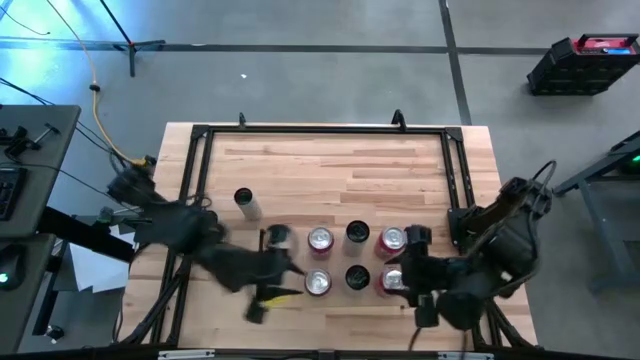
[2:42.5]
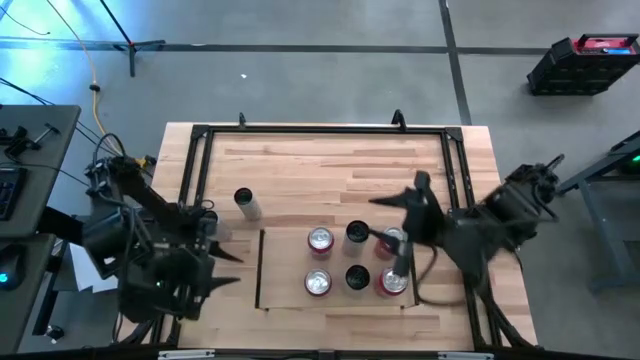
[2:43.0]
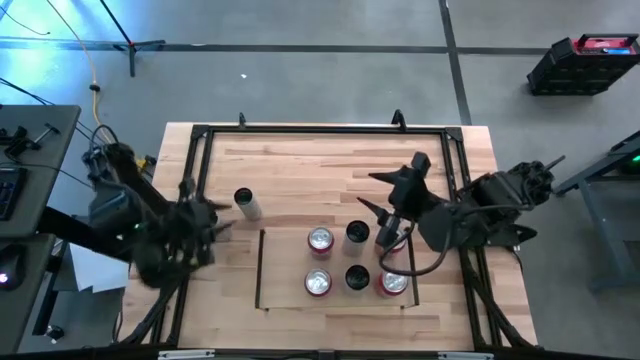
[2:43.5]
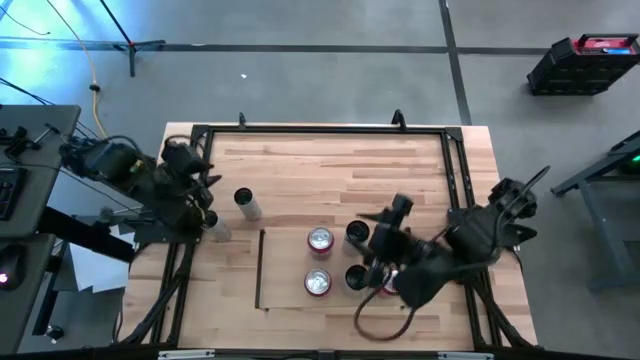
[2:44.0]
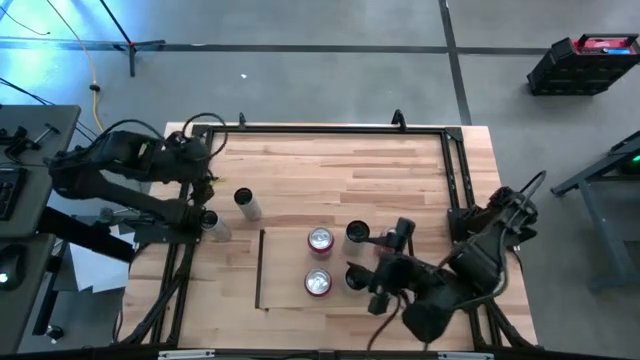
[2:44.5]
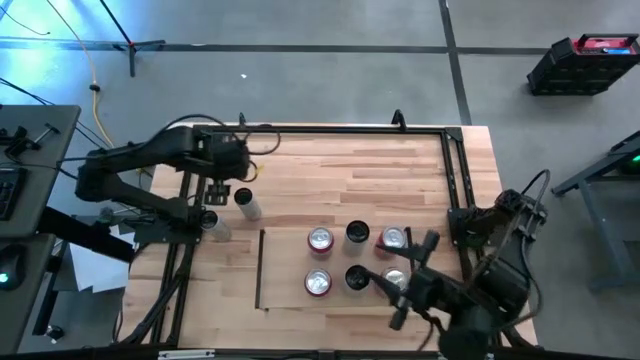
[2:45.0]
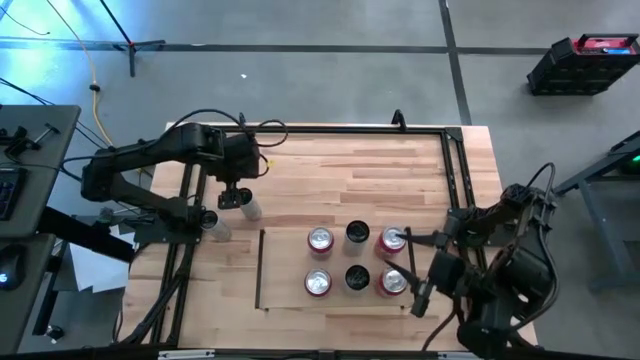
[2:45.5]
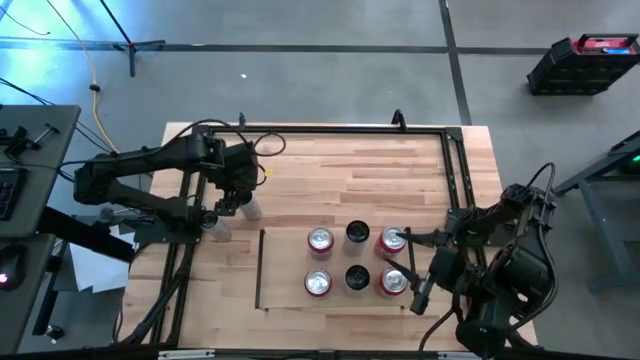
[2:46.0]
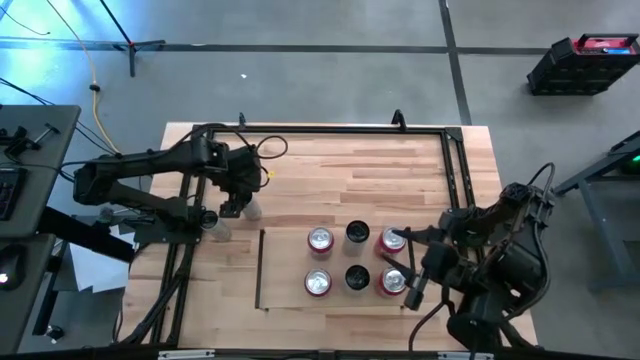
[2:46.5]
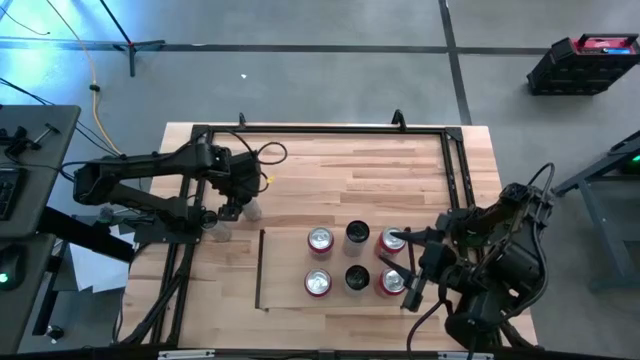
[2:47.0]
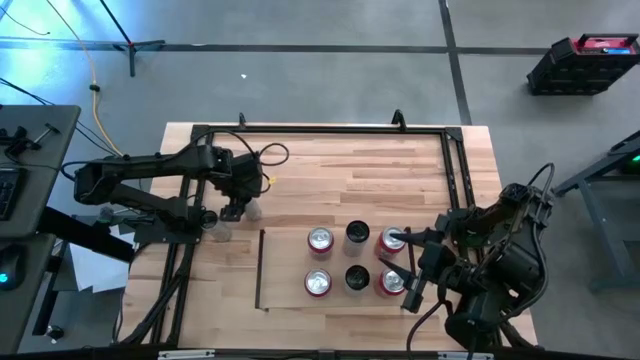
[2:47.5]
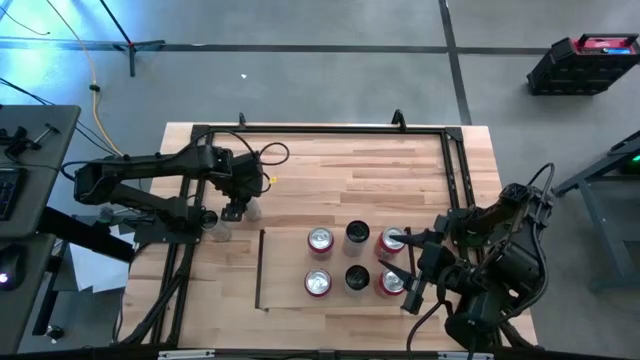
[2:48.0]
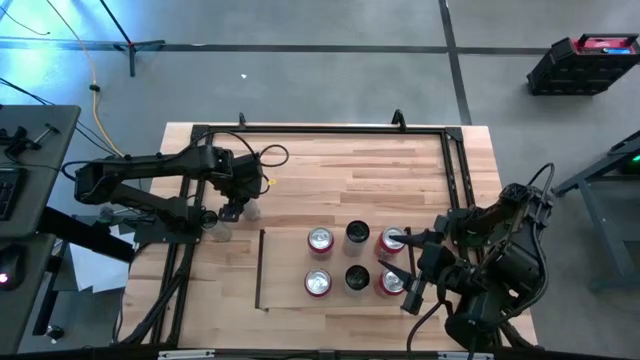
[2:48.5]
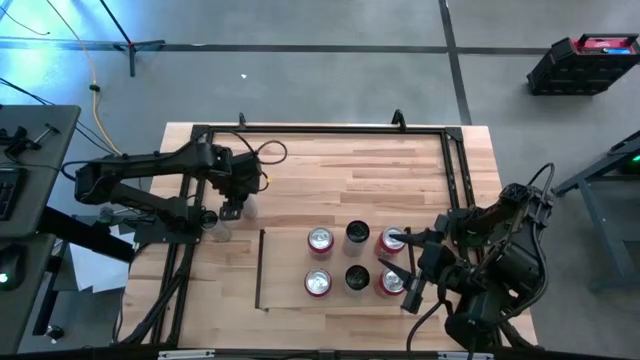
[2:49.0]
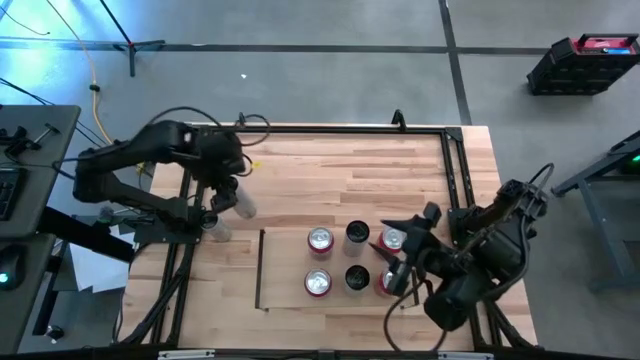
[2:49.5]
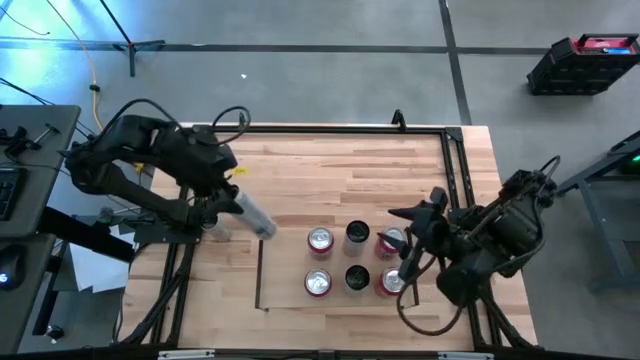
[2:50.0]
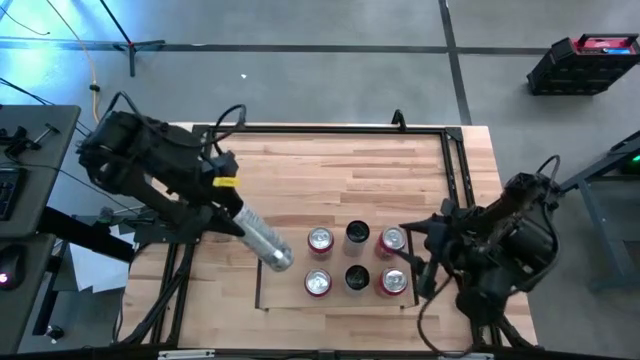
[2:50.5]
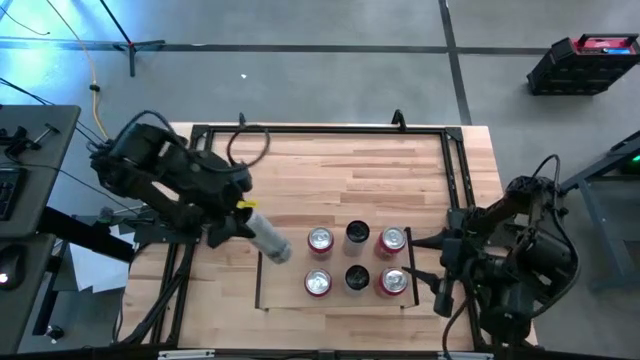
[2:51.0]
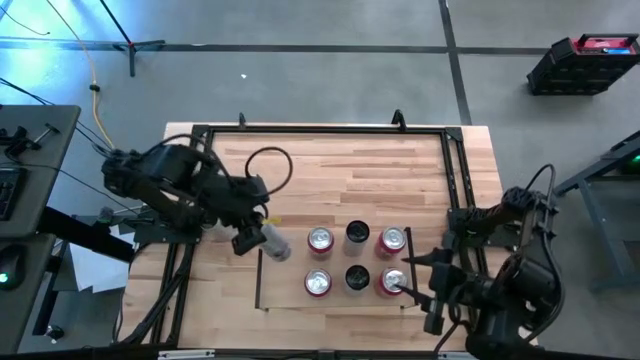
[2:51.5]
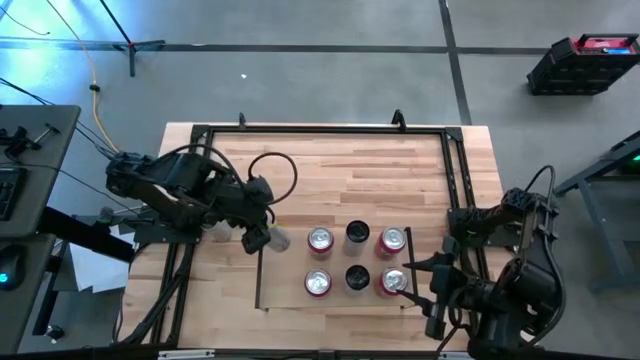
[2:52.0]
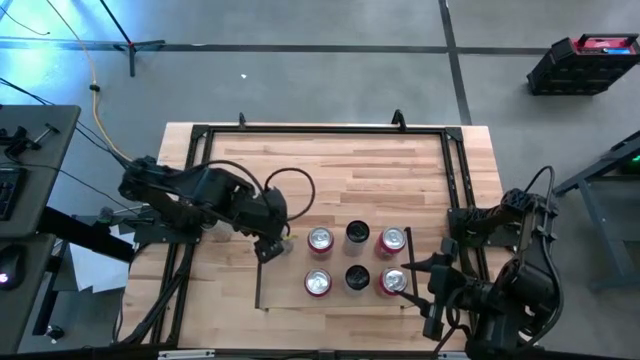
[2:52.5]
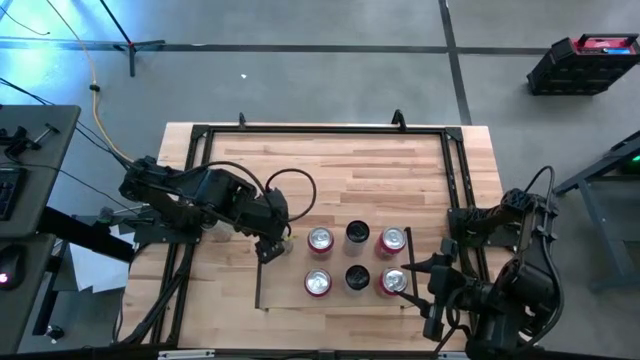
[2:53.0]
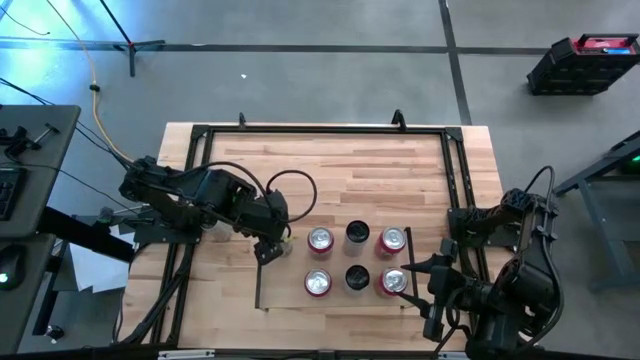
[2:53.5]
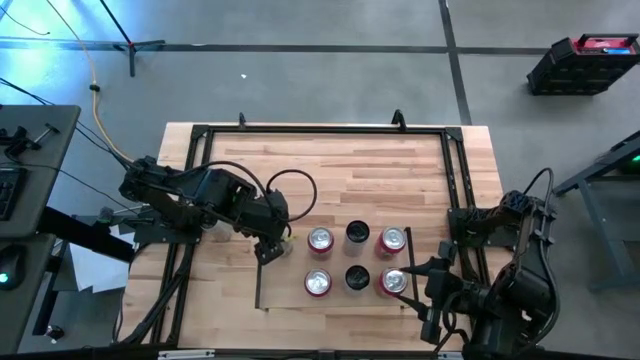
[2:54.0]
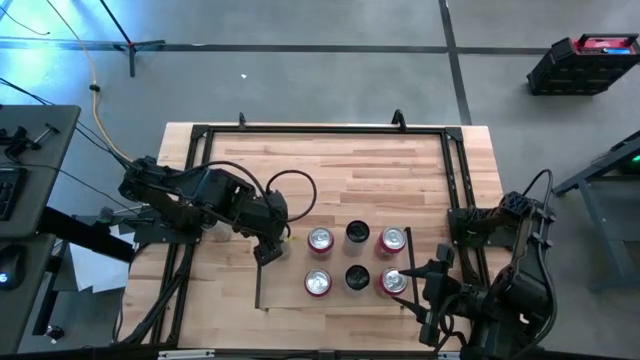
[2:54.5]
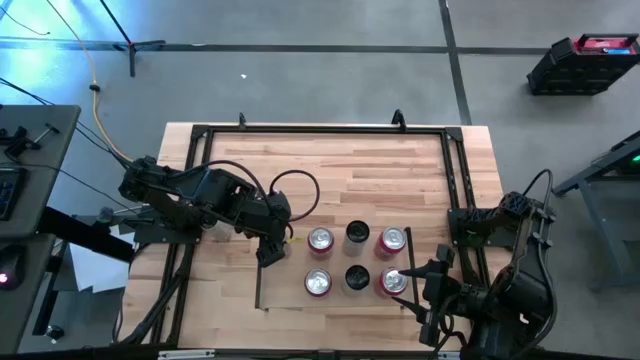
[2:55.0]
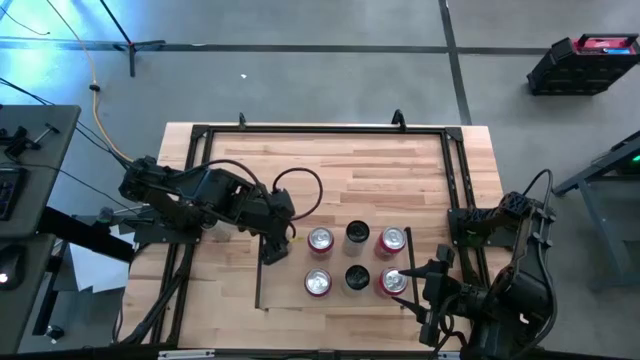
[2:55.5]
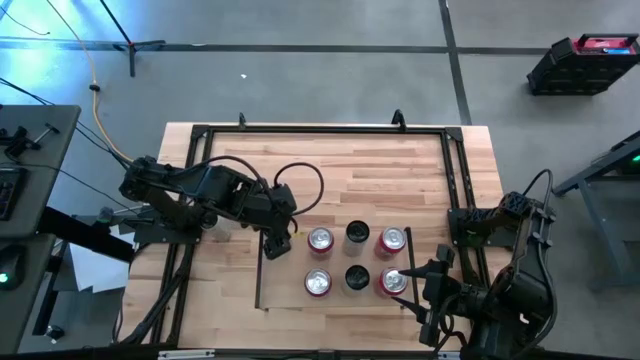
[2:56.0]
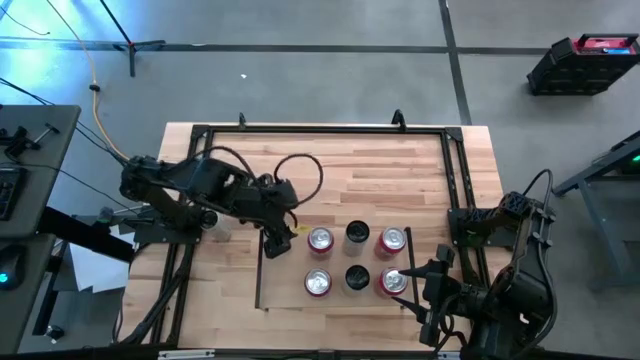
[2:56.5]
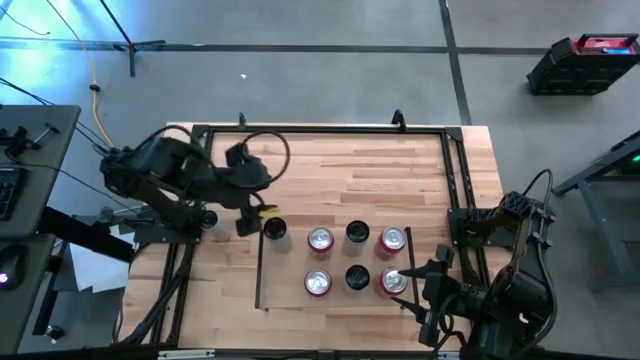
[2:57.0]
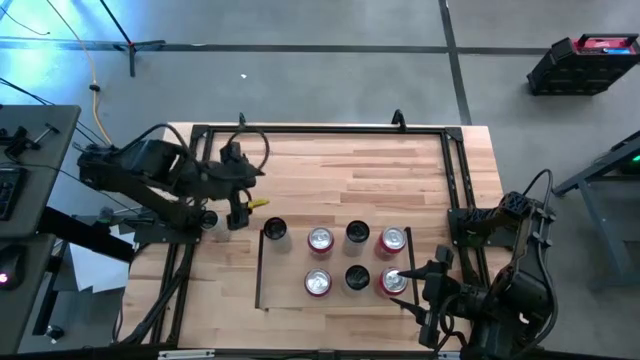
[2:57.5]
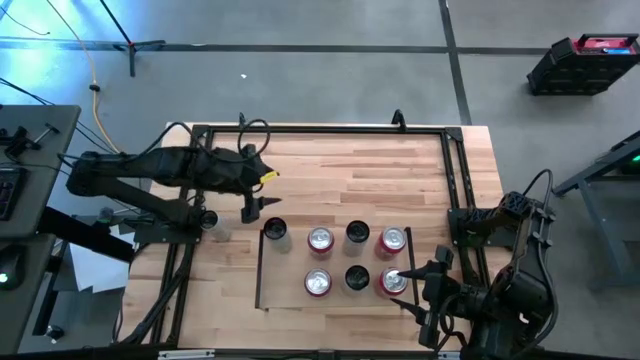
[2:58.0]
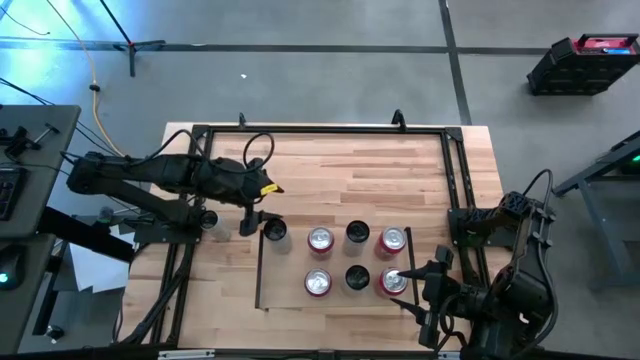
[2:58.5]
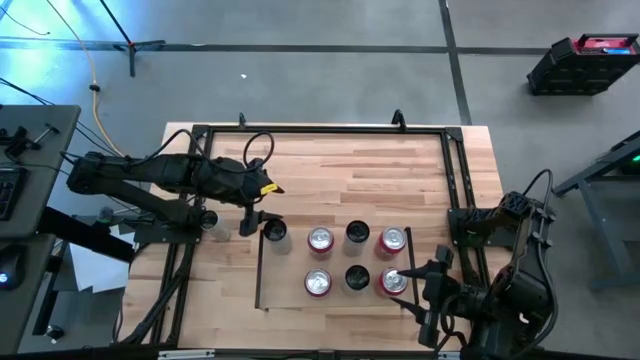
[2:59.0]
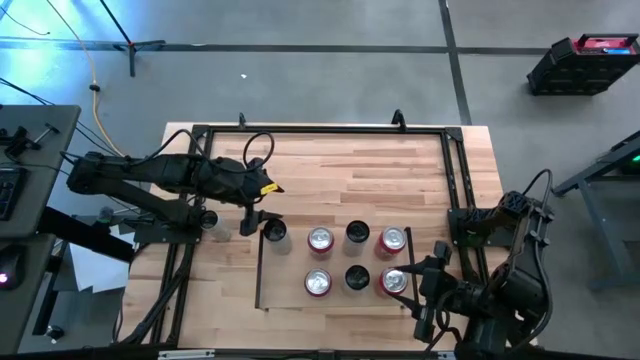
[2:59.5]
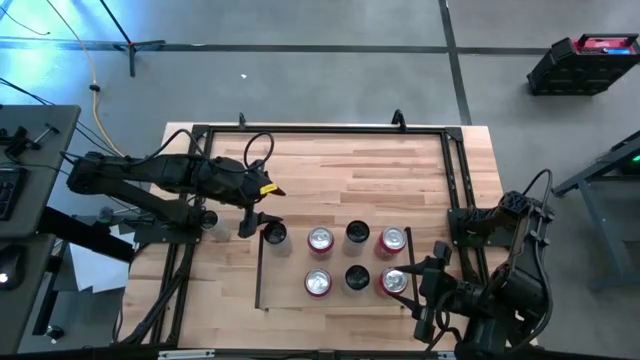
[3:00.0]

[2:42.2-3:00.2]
Task: Place canned beverage on shelf
Put the top white yellow soda can on the shelf
